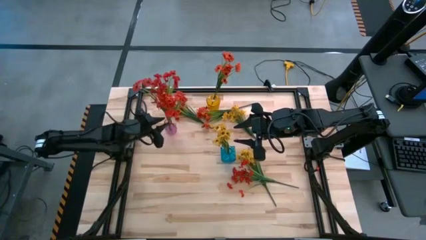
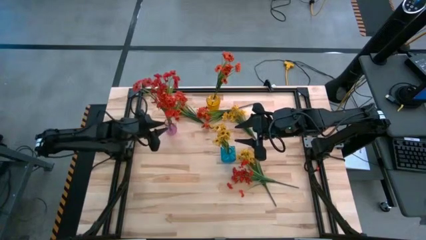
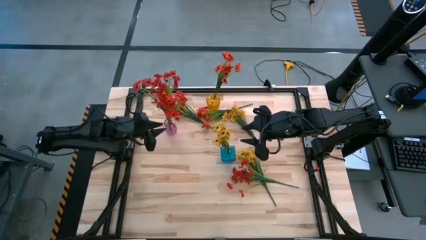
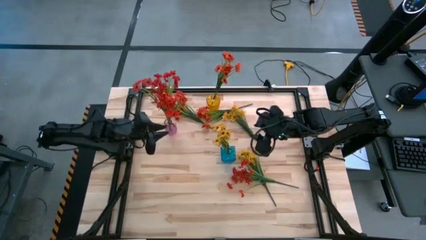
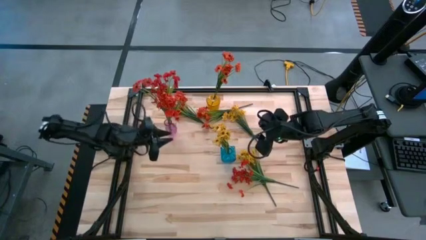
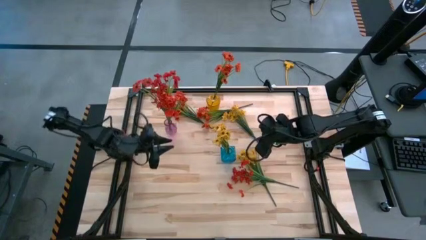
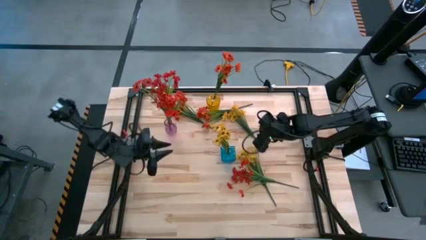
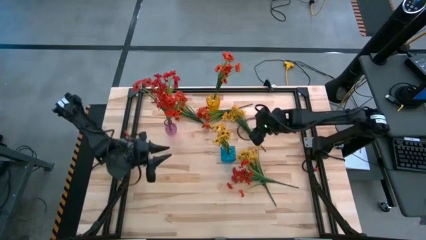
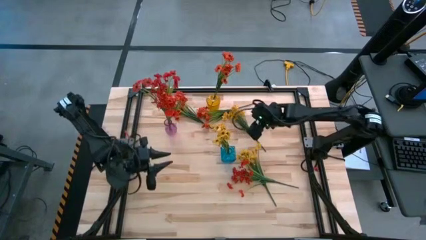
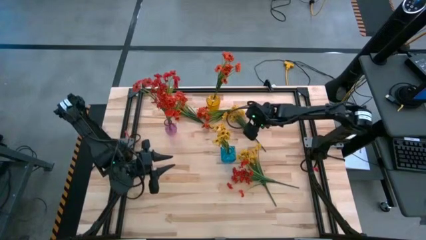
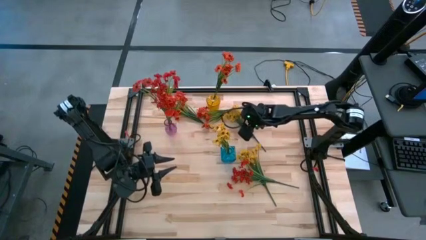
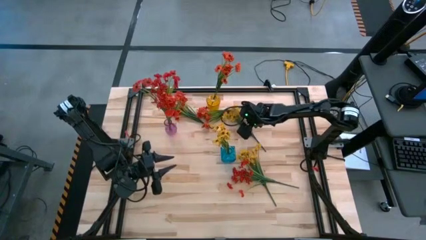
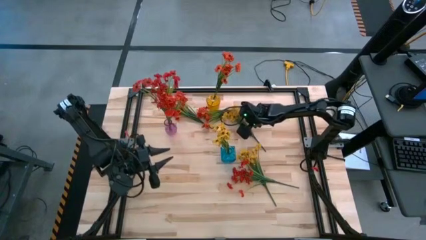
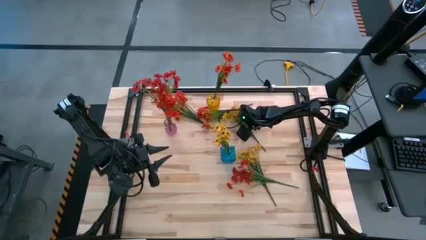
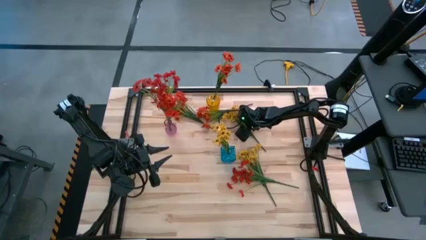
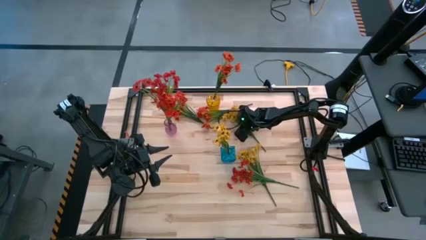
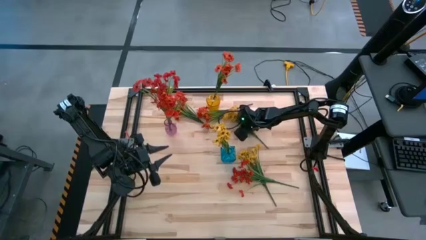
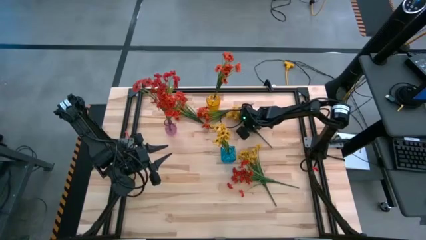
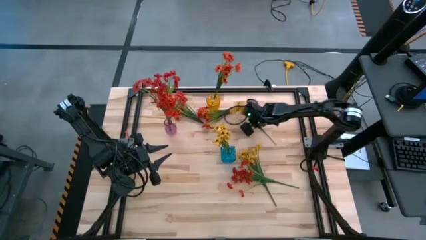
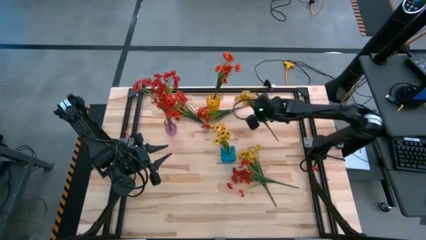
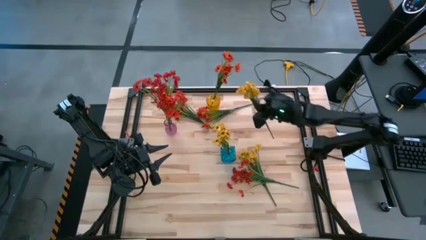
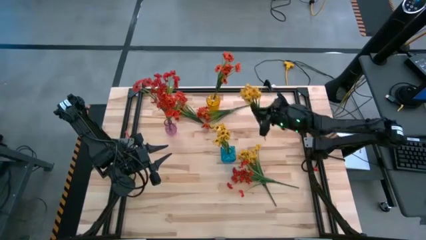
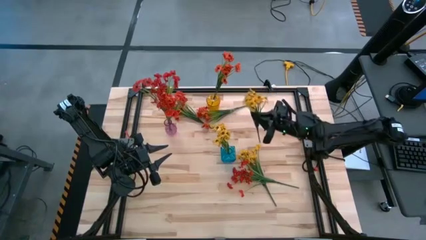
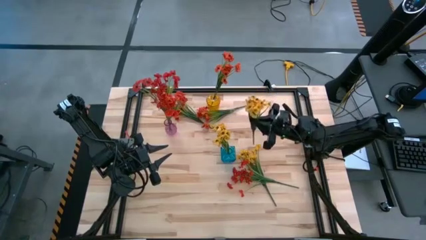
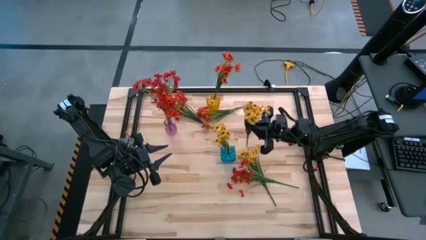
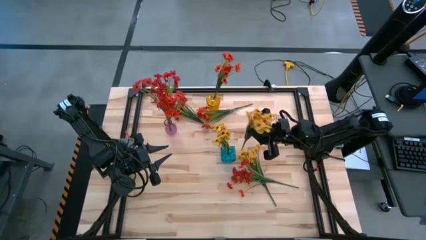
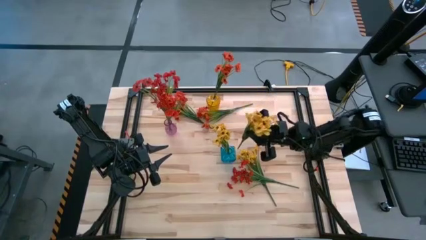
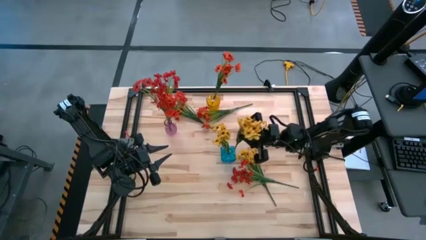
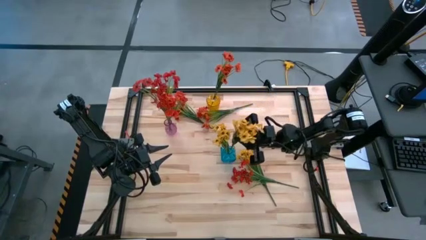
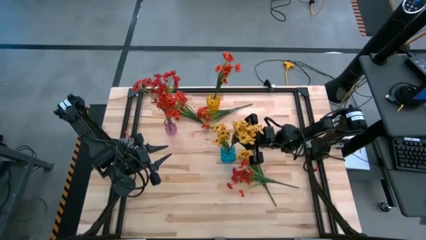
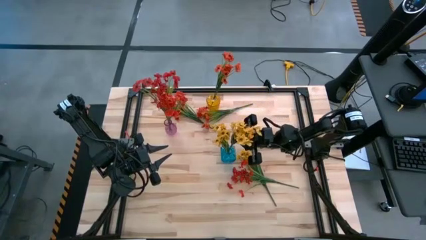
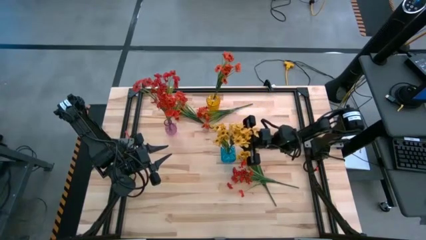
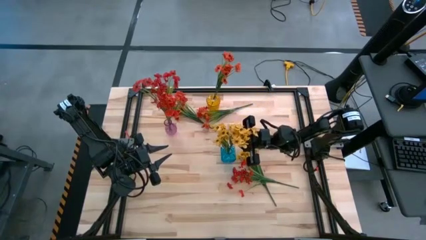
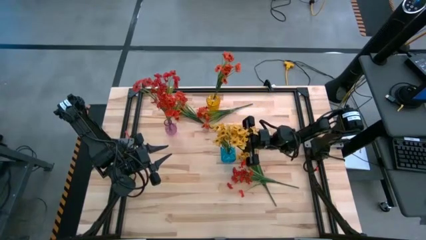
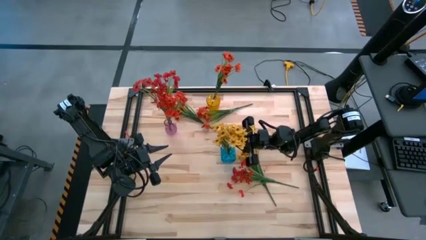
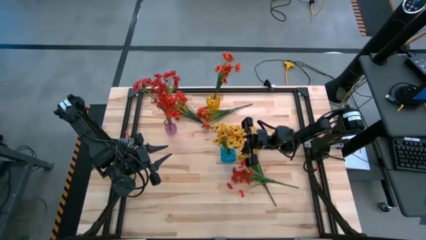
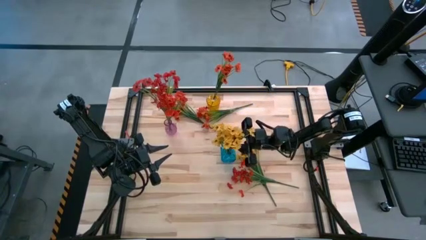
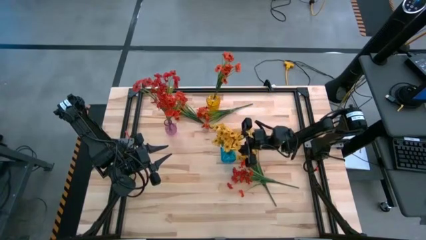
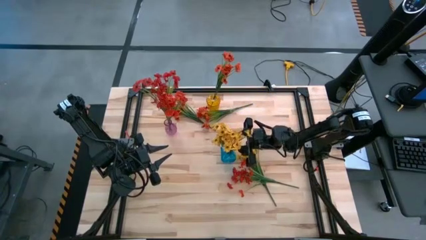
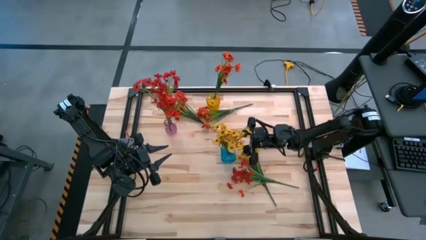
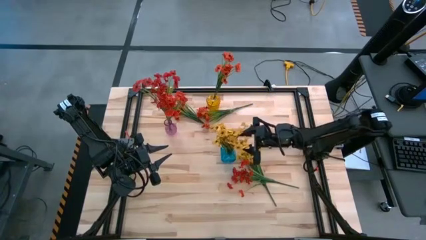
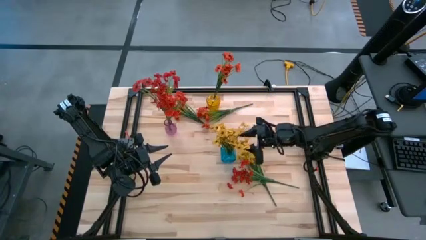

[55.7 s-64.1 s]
Task: Sort flowers into vase by color
Put the top yellow flowers into the blue vase
